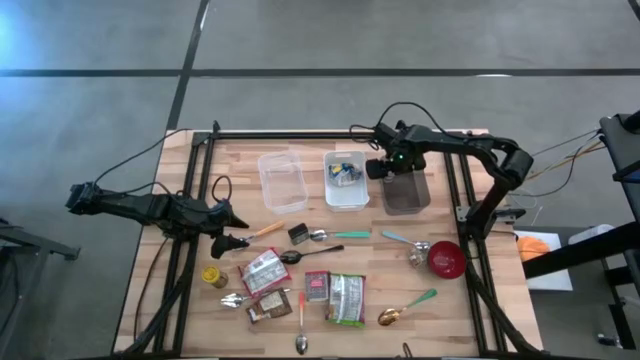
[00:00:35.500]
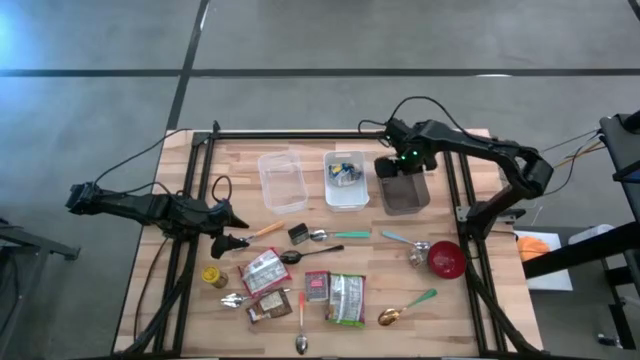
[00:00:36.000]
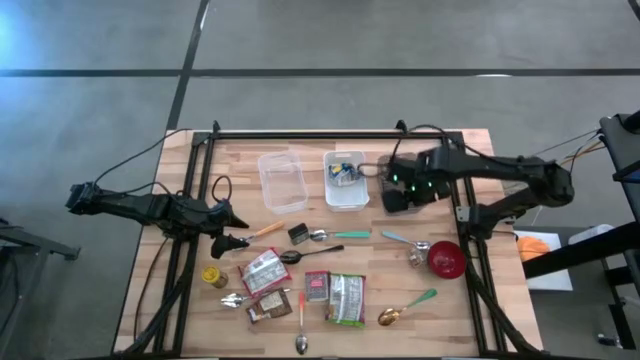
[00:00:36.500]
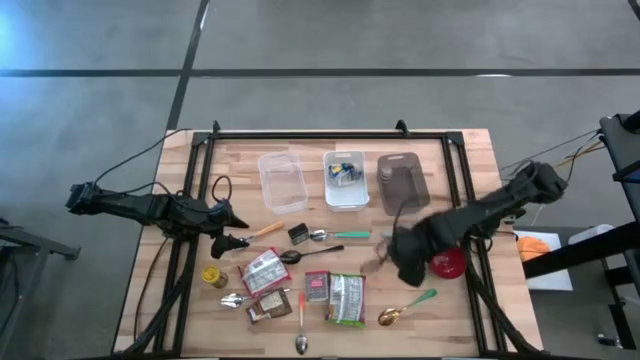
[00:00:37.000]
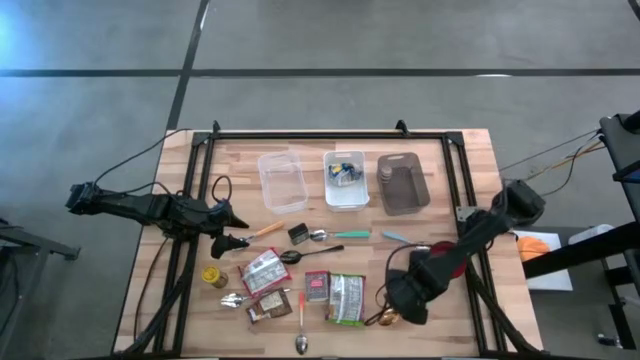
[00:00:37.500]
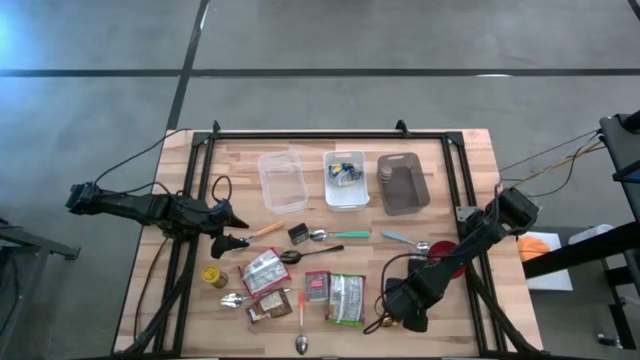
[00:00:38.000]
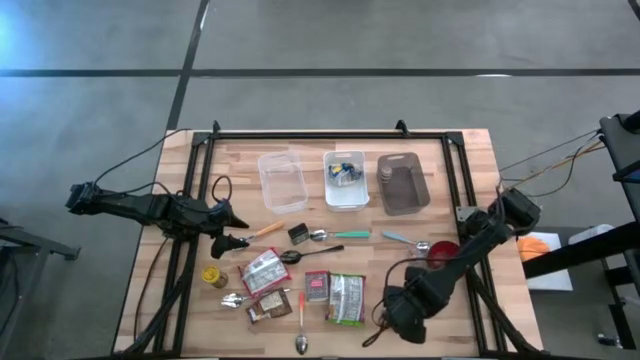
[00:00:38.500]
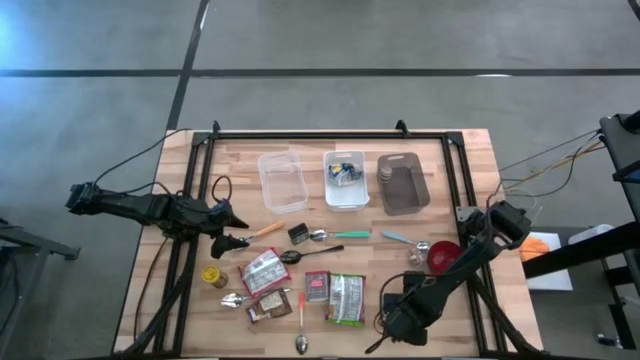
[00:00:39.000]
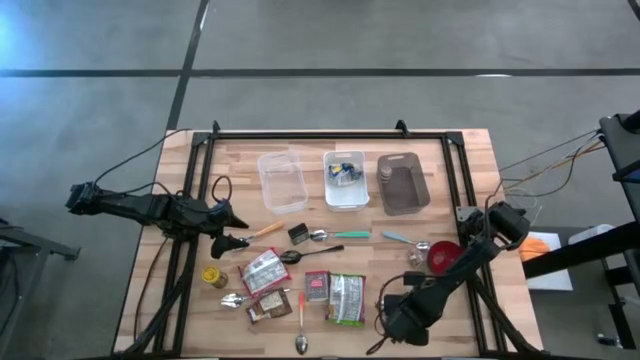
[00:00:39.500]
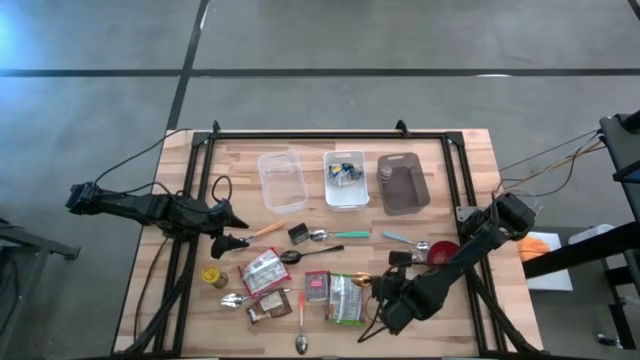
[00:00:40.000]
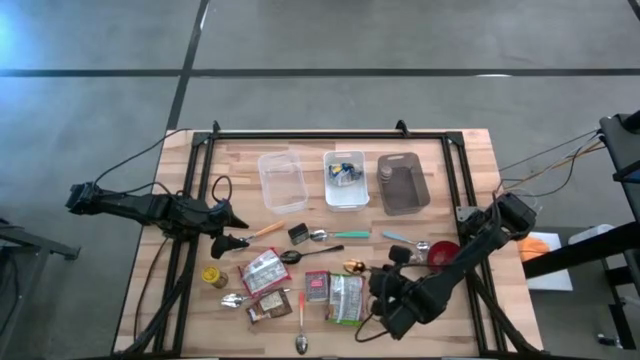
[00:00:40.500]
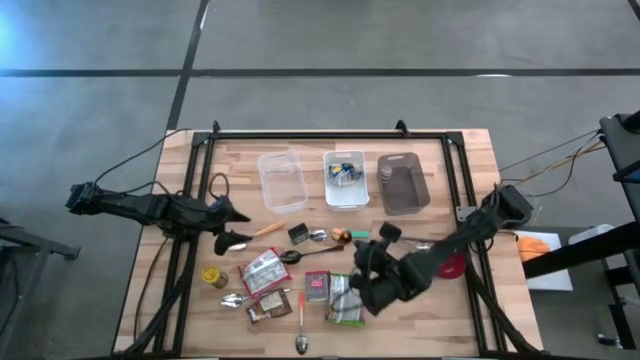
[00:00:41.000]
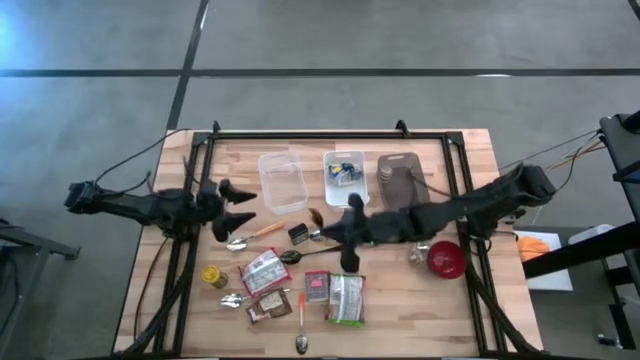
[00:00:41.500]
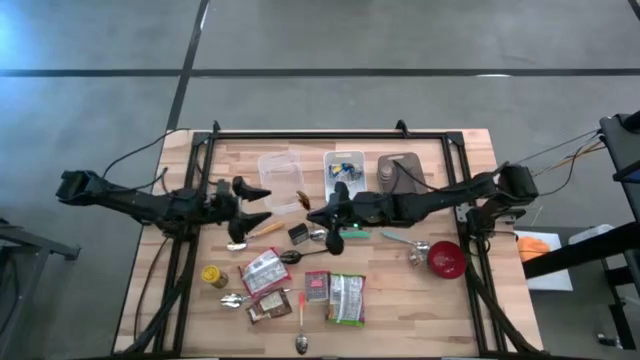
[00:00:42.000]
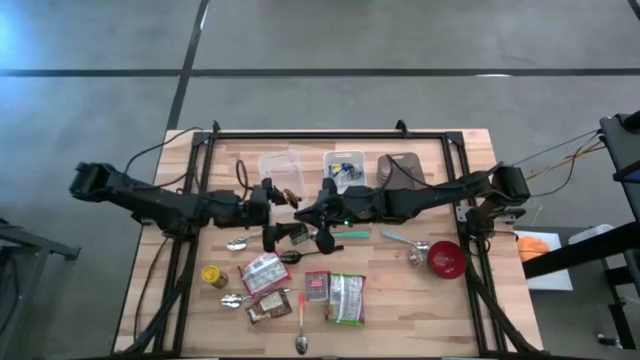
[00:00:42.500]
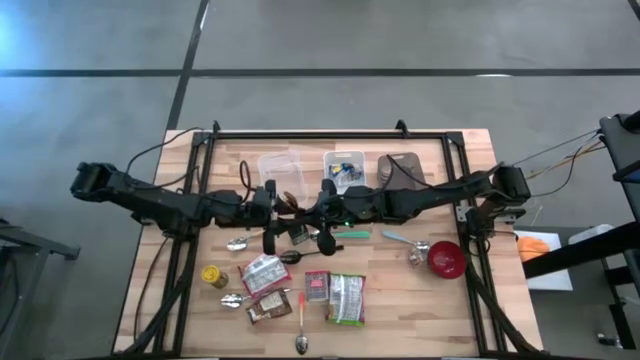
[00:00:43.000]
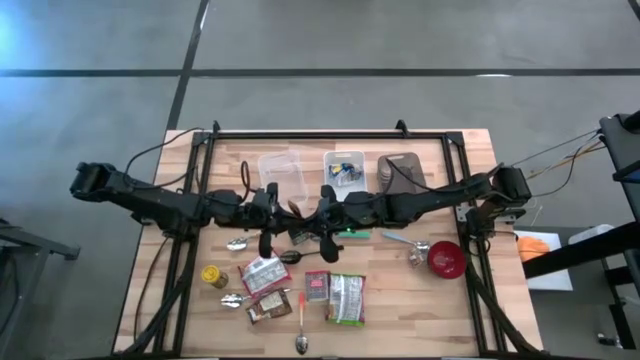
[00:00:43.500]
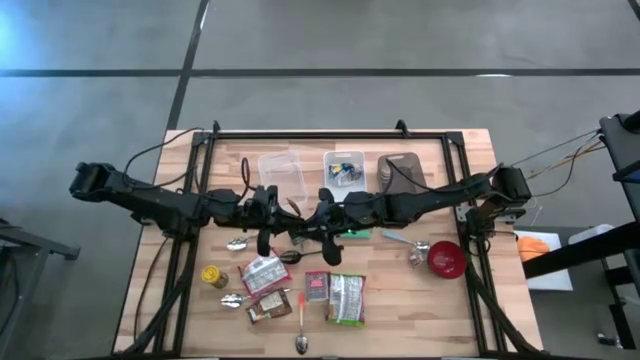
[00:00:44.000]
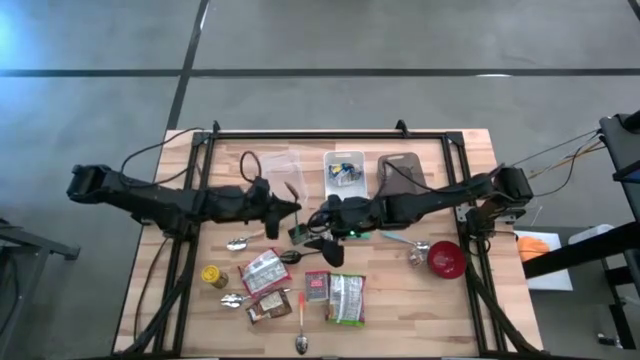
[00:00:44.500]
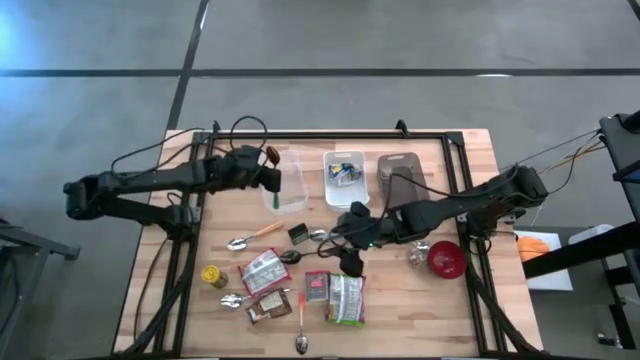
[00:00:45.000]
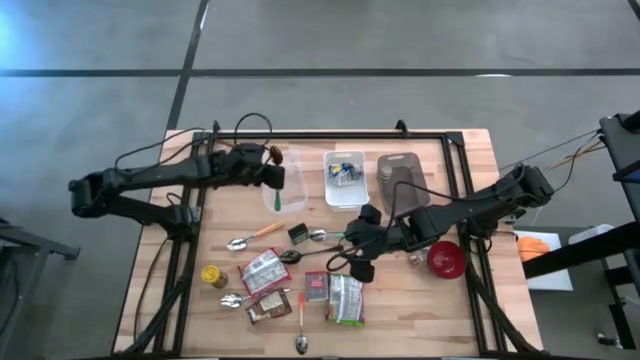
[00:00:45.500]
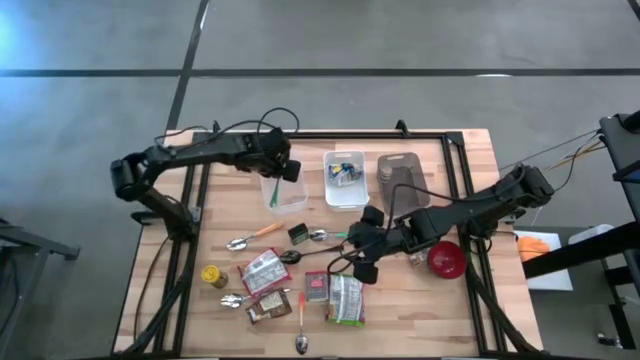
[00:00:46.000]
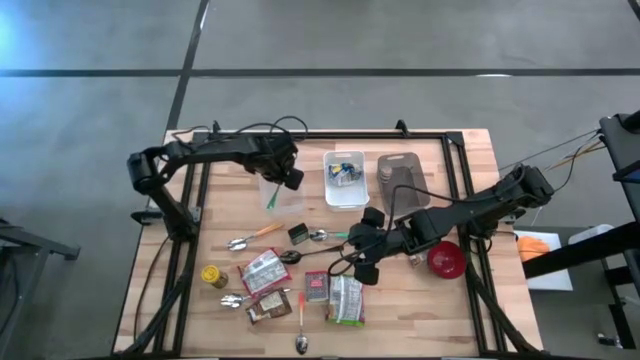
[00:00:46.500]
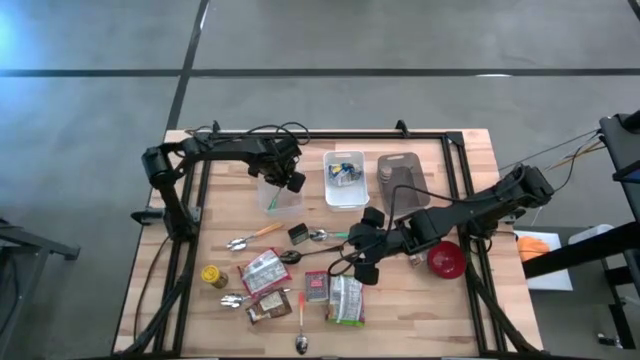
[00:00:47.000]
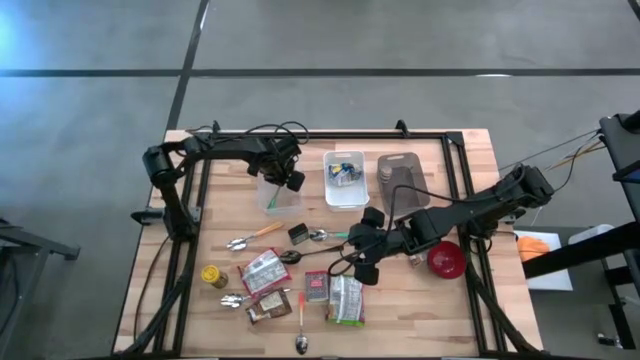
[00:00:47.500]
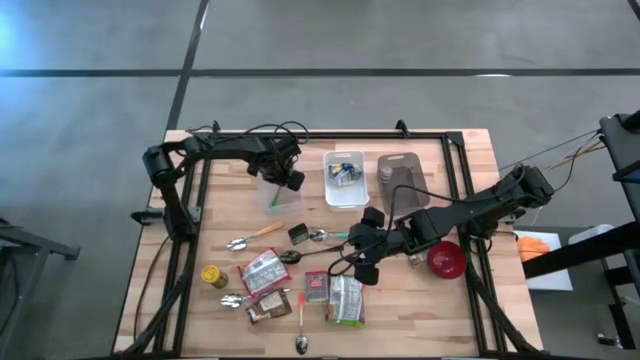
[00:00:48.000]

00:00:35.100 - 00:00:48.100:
Put the gold spoon into the transparent bin

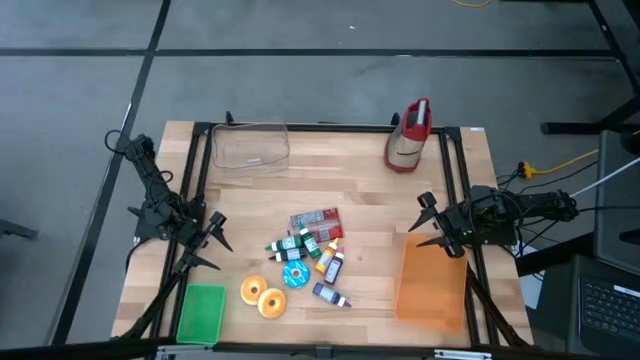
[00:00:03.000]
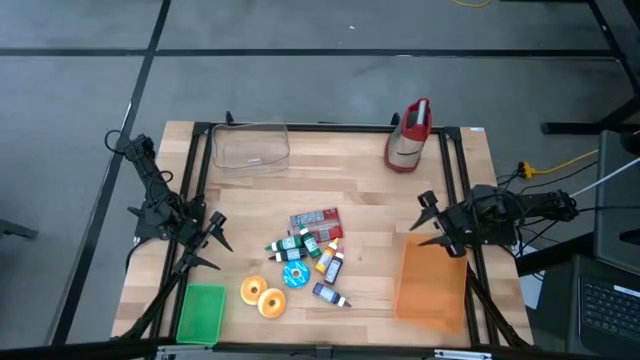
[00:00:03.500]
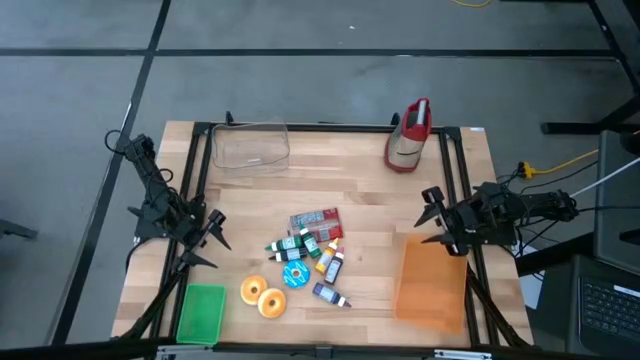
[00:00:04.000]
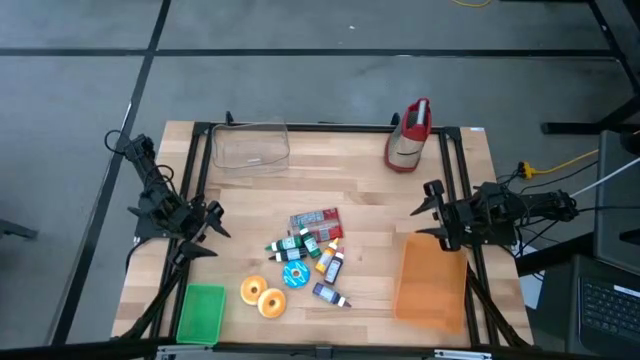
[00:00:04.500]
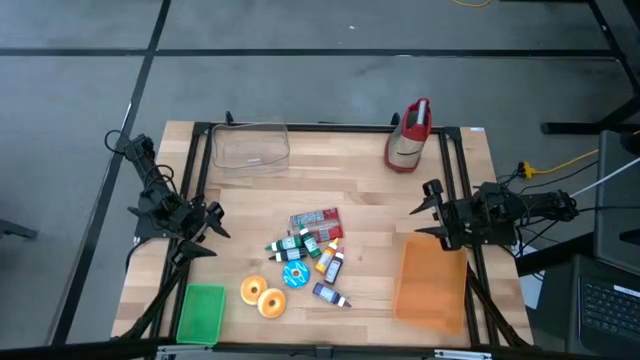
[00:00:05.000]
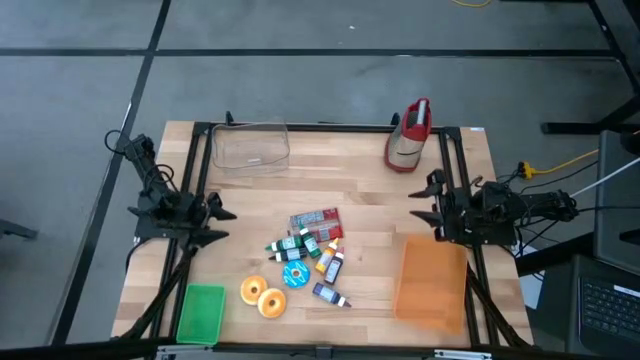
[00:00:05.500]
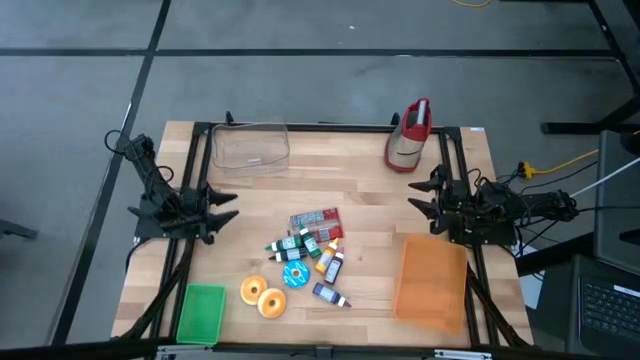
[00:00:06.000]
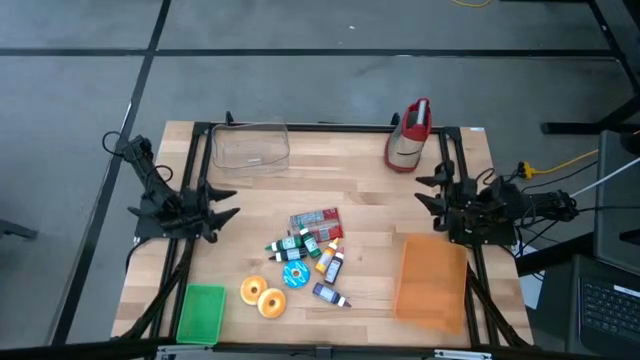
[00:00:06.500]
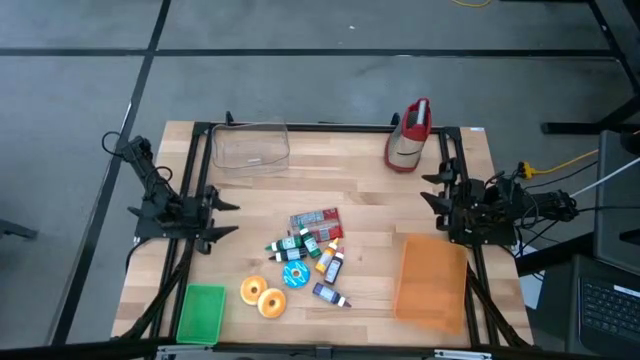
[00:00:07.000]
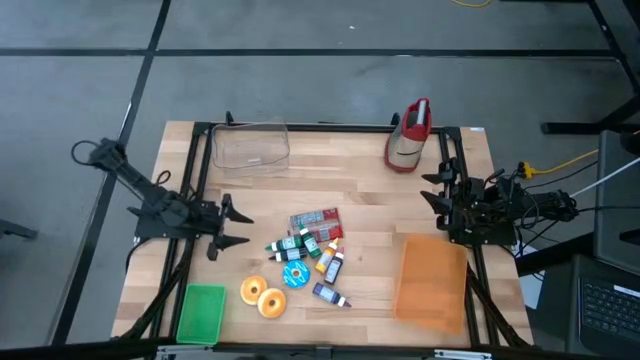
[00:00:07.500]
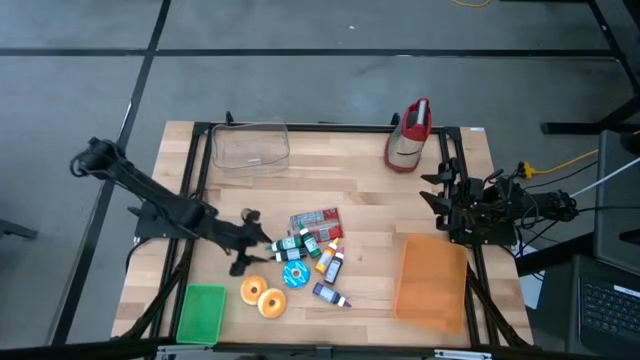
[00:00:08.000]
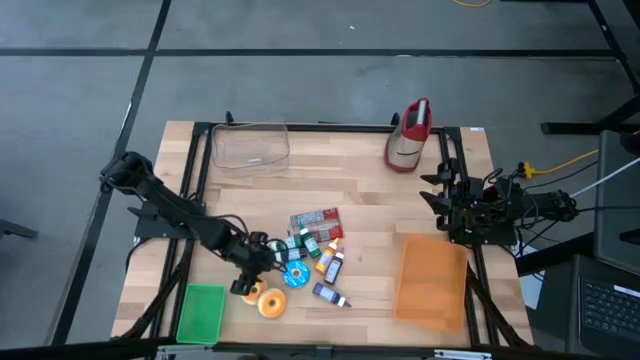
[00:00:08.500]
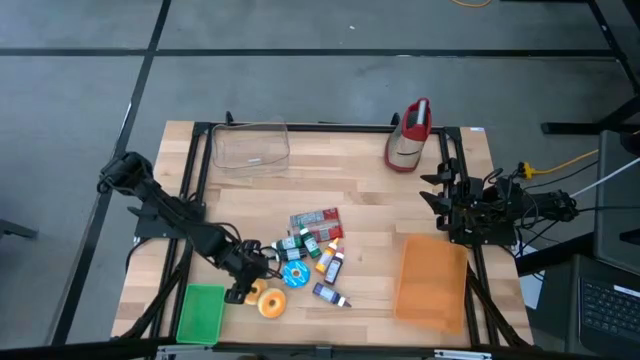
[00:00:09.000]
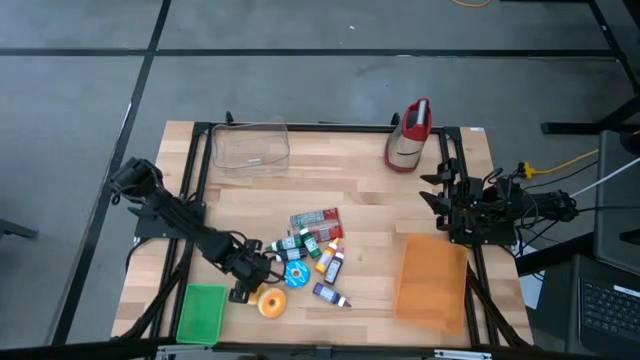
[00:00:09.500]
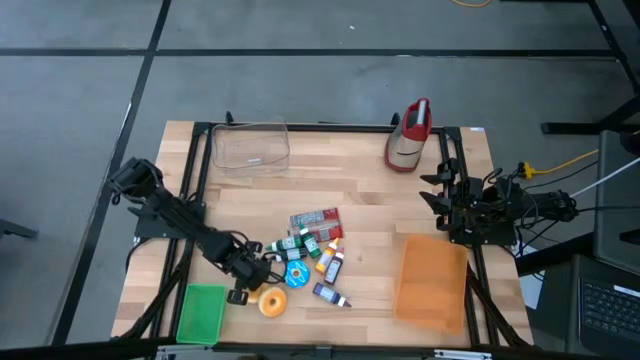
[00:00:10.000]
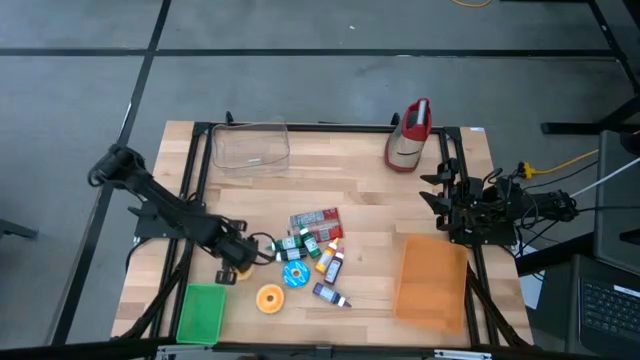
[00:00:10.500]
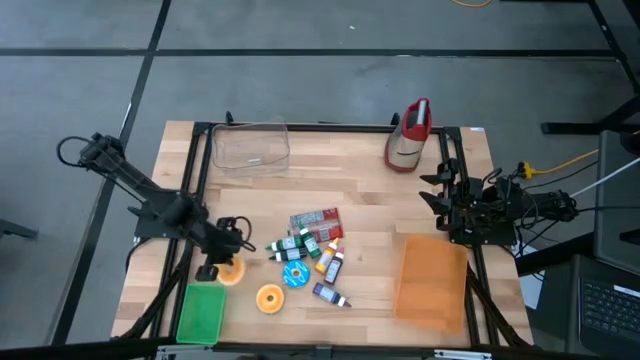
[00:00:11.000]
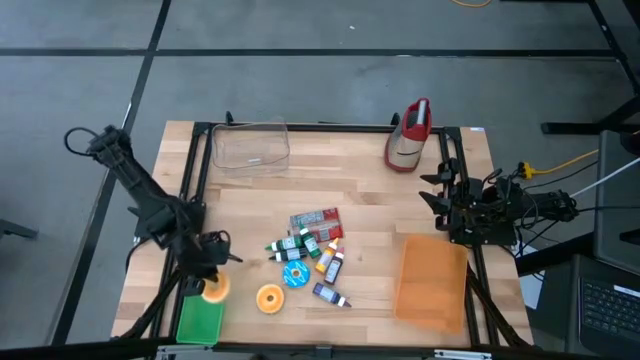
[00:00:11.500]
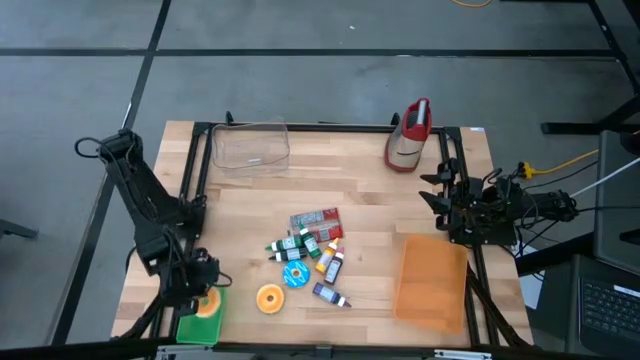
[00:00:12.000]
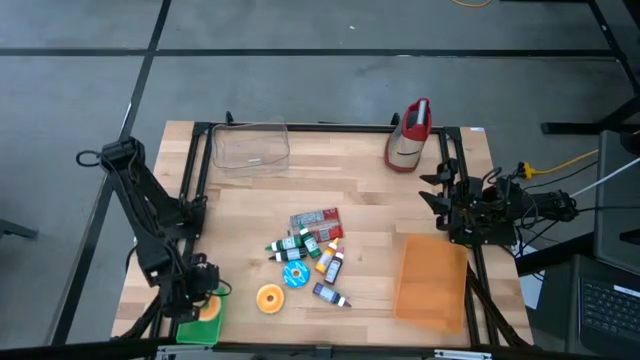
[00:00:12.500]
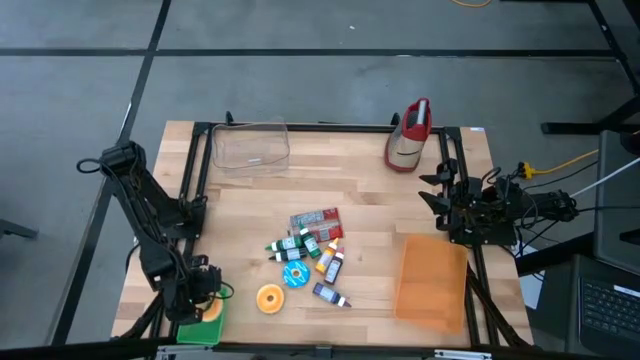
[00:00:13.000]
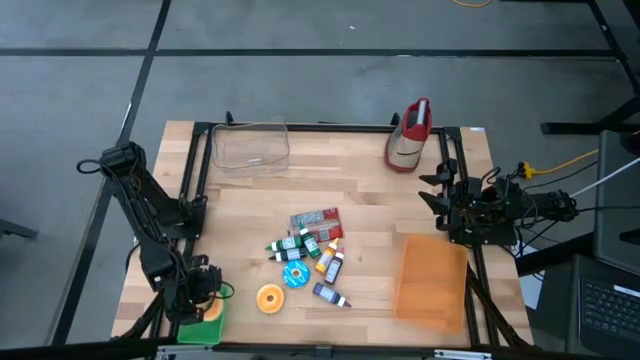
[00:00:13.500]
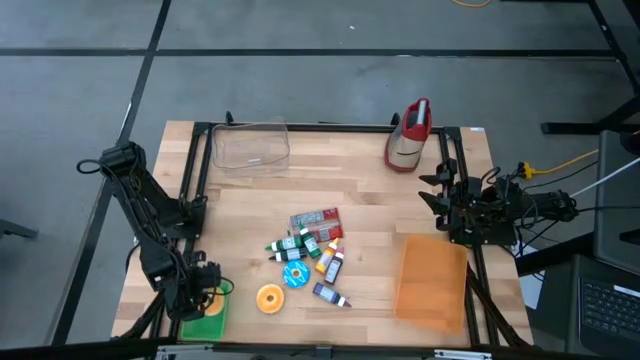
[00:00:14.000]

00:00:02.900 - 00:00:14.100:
Put the left yellow donut into the green bin
